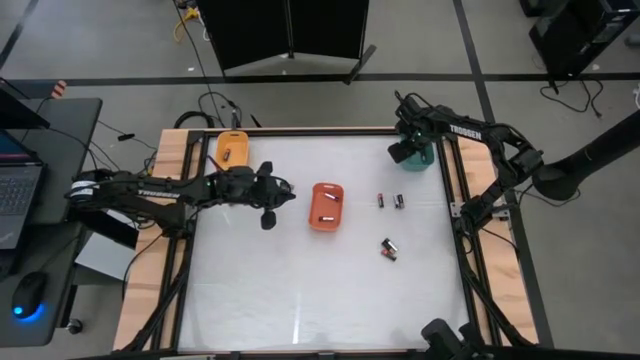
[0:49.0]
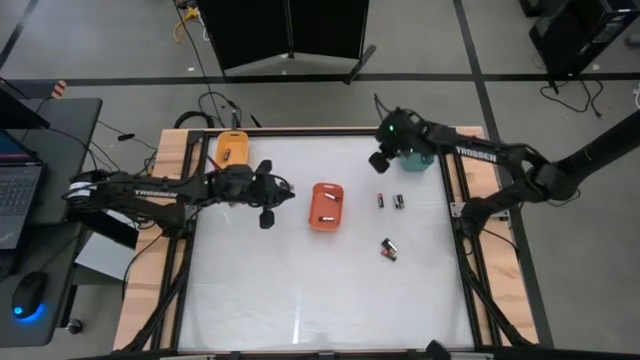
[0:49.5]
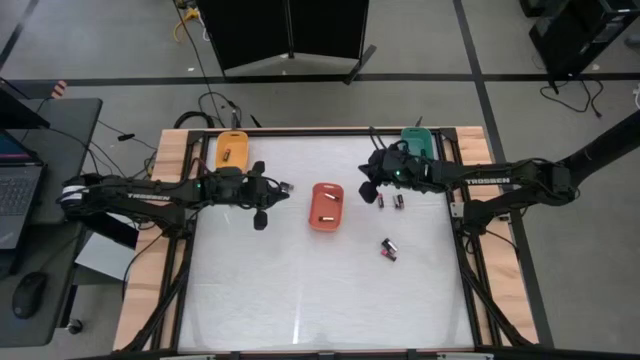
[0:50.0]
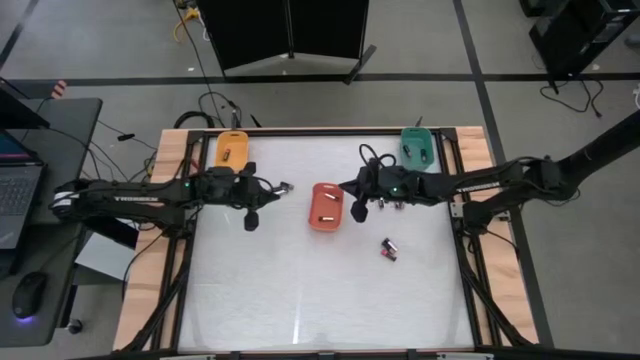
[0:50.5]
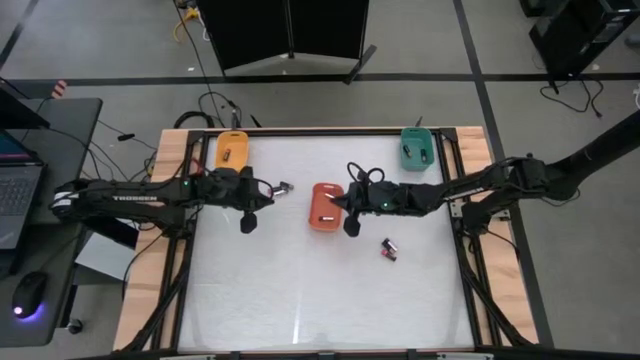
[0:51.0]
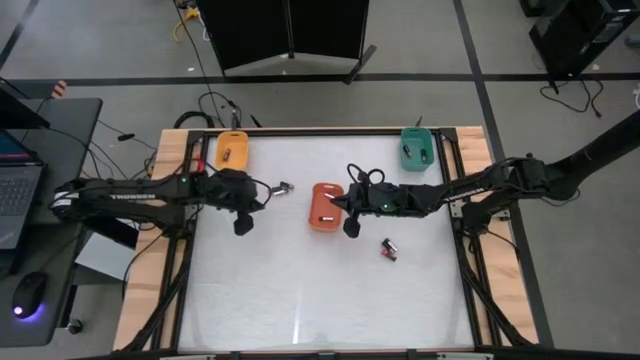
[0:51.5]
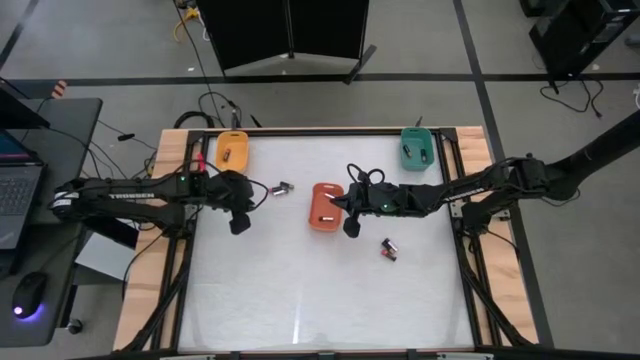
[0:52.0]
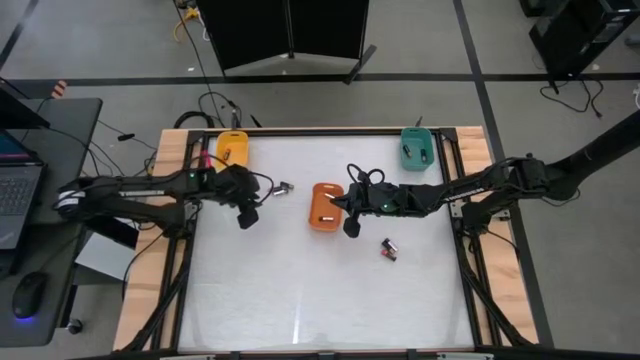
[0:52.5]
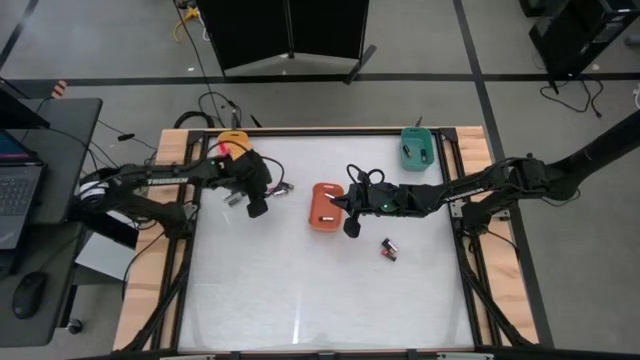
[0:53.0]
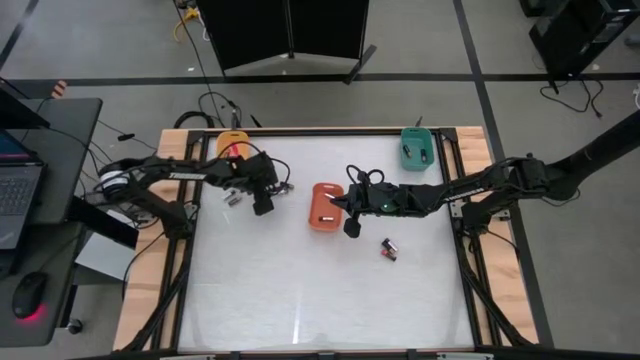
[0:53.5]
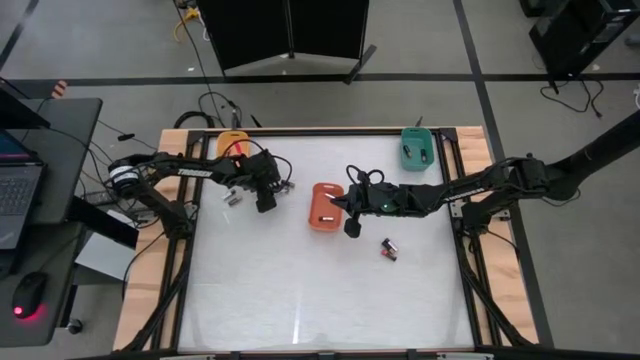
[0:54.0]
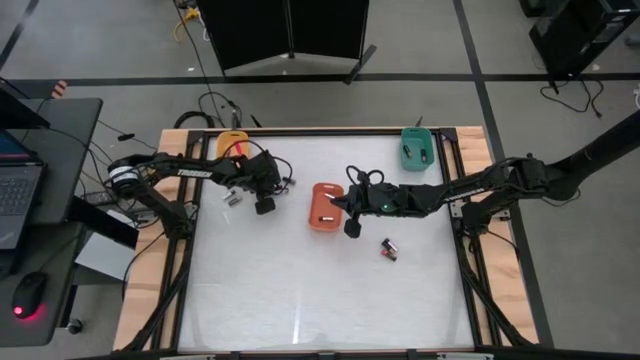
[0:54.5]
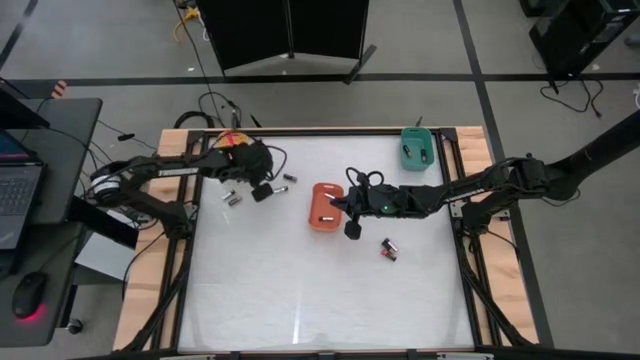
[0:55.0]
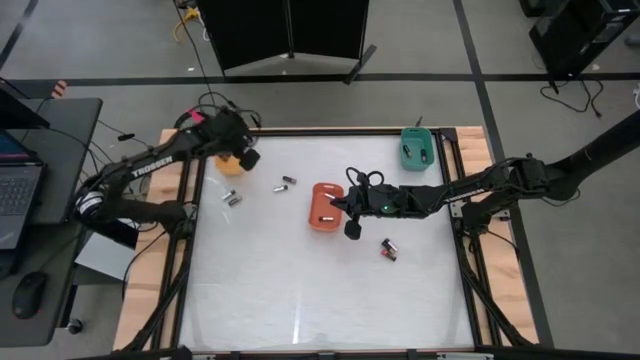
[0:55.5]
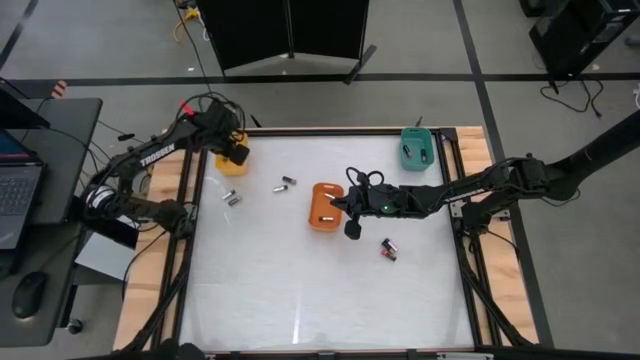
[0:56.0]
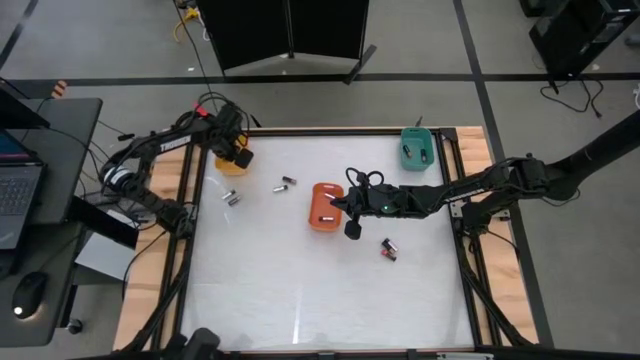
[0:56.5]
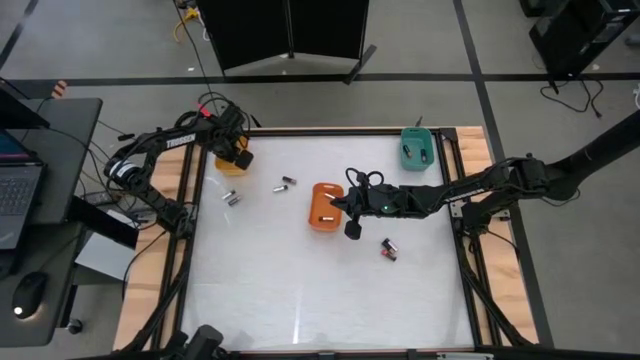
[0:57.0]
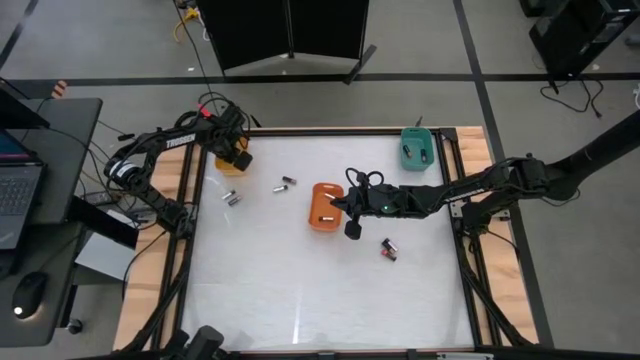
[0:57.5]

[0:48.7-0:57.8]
Task: Sort batteries
Put the black-red battery into the yellow bin

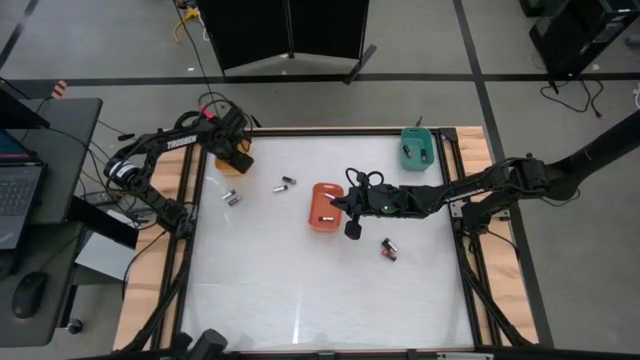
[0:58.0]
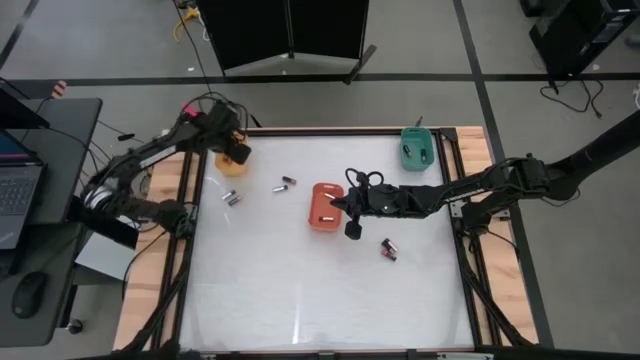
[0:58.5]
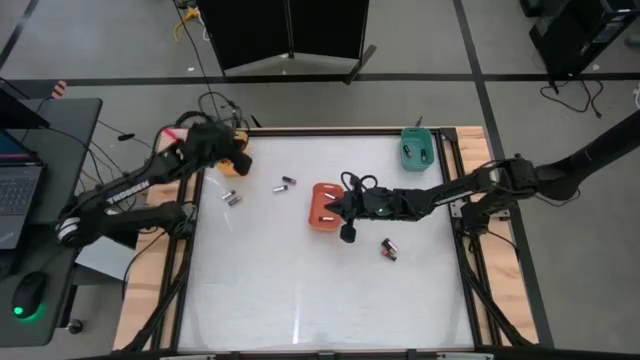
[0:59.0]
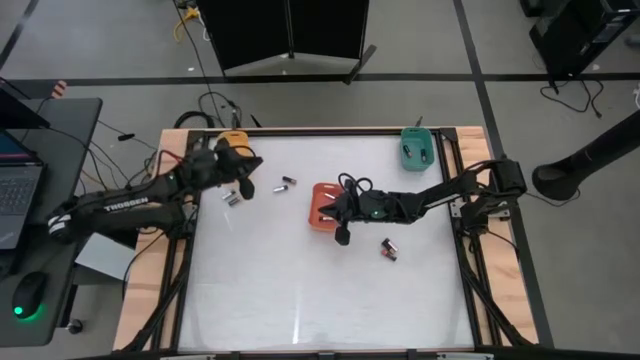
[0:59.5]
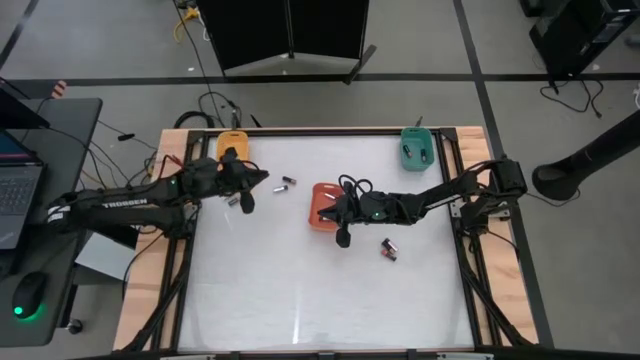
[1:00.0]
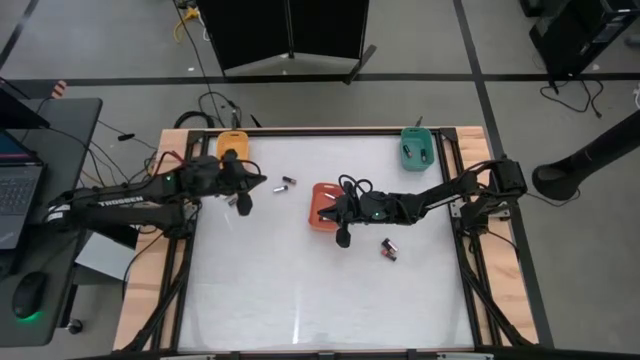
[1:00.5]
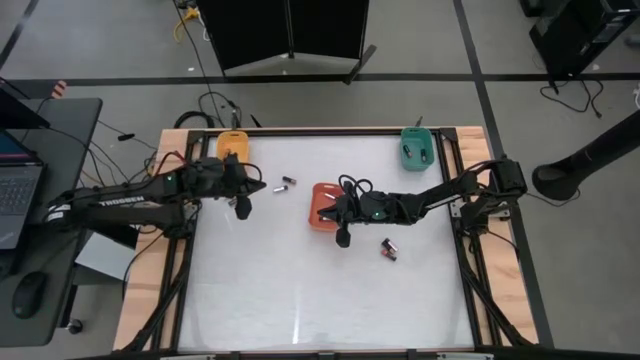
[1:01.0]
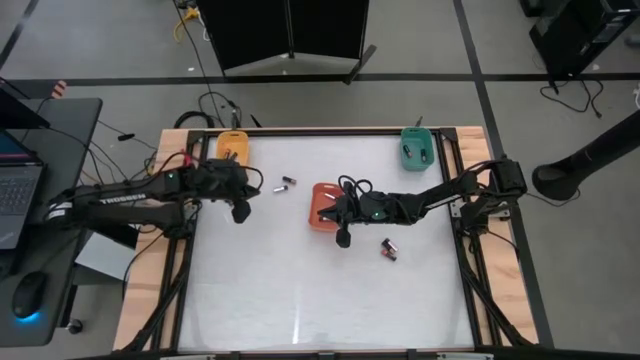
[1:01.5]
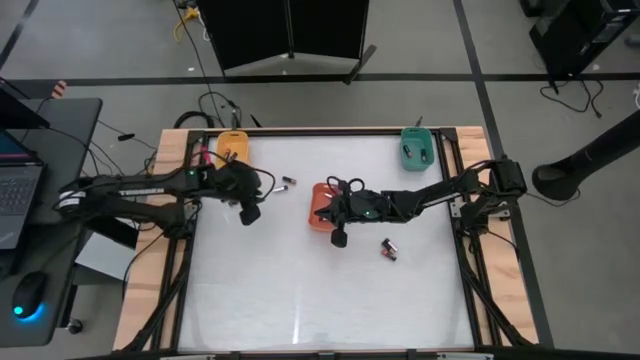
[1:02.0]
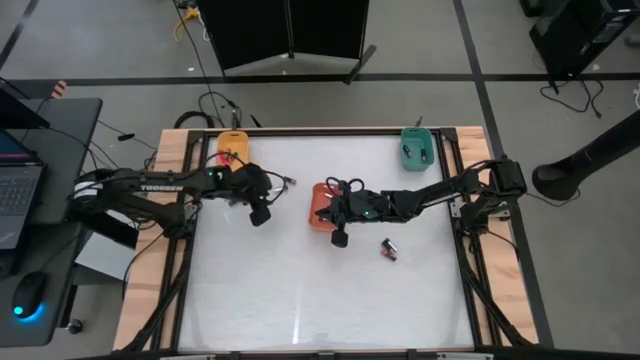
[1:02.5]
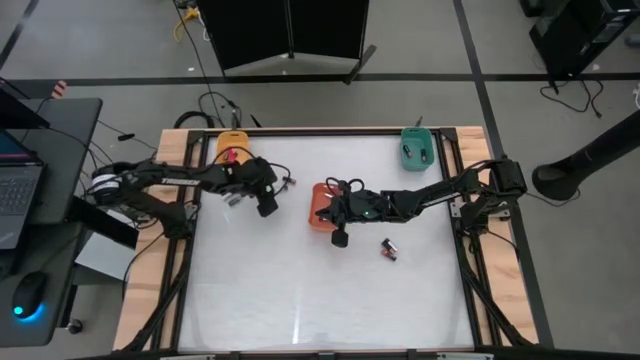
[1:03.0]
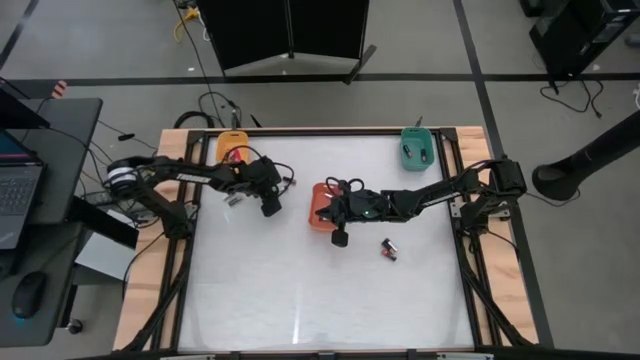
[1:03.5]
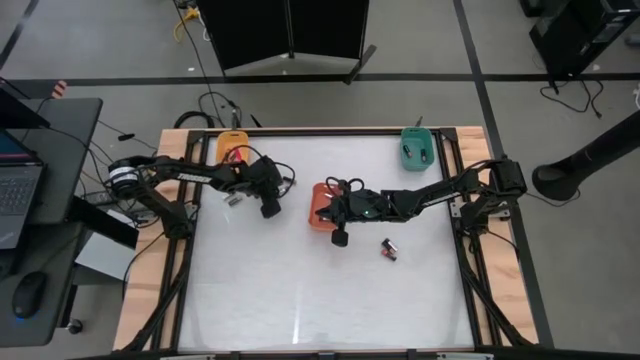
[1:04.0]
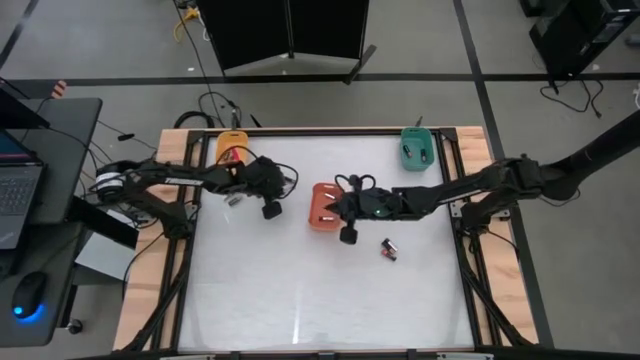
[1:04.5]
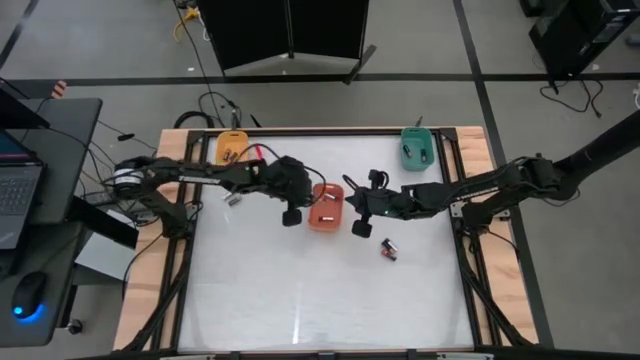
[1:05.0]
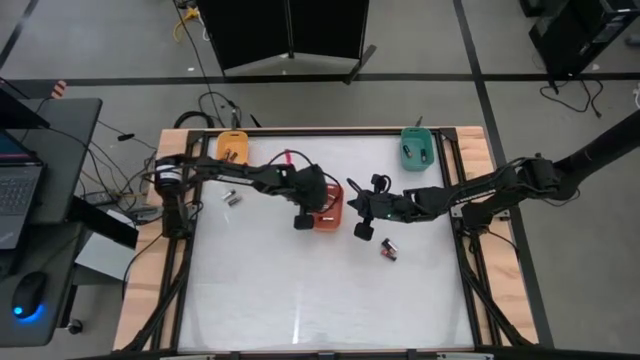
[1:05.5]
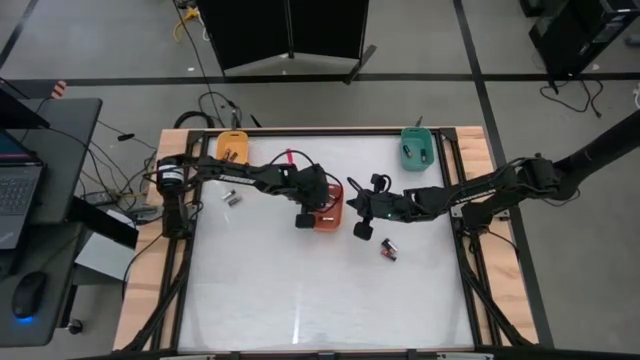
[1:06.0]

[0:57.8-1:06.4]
Put the silver battery into the orange bin

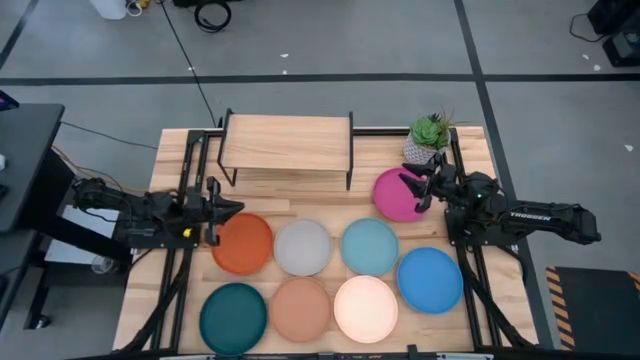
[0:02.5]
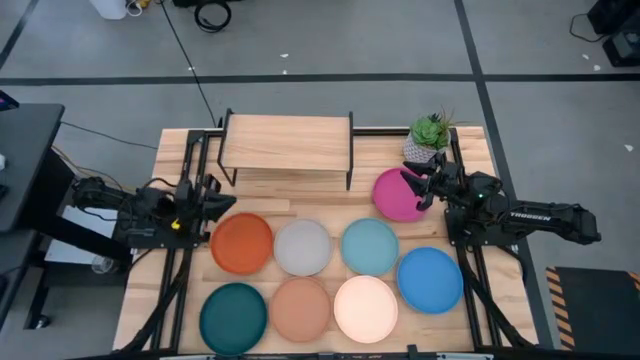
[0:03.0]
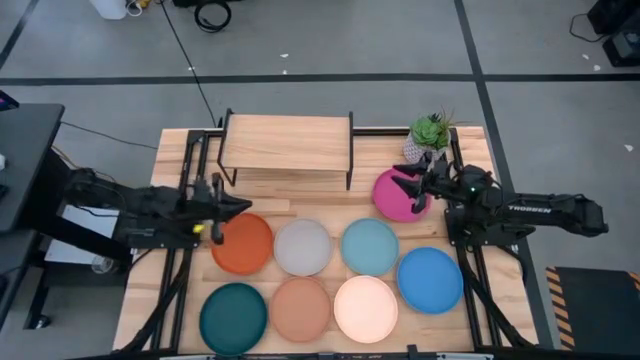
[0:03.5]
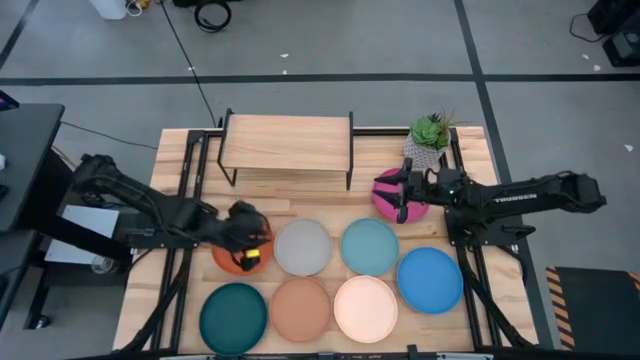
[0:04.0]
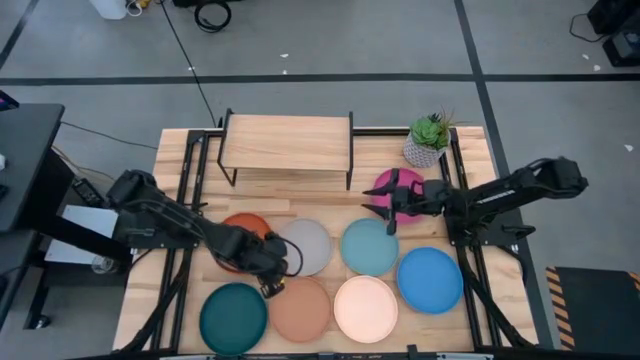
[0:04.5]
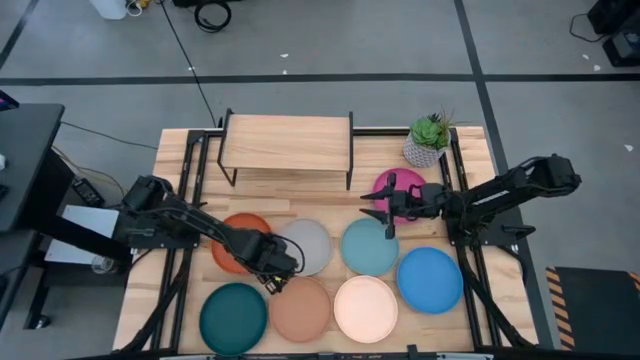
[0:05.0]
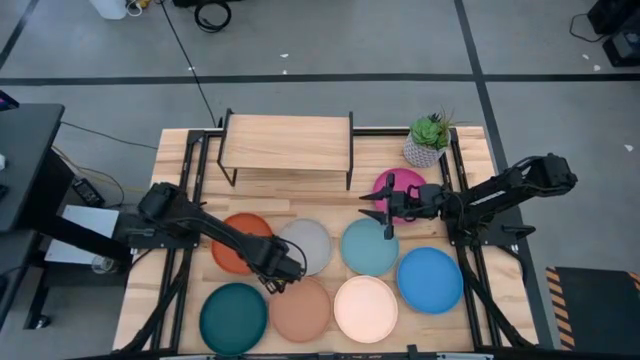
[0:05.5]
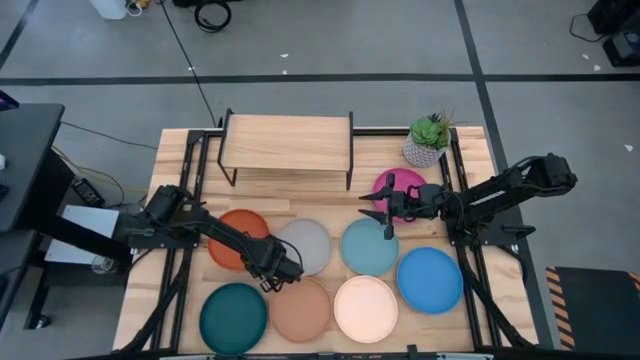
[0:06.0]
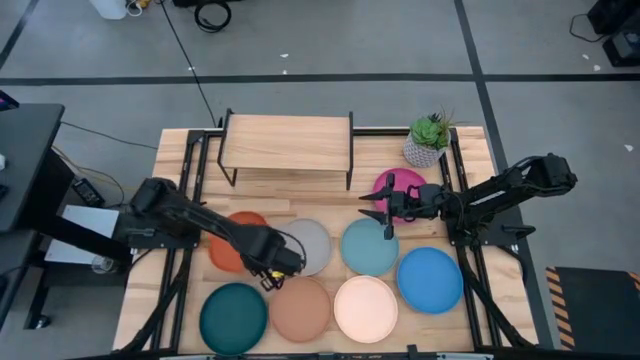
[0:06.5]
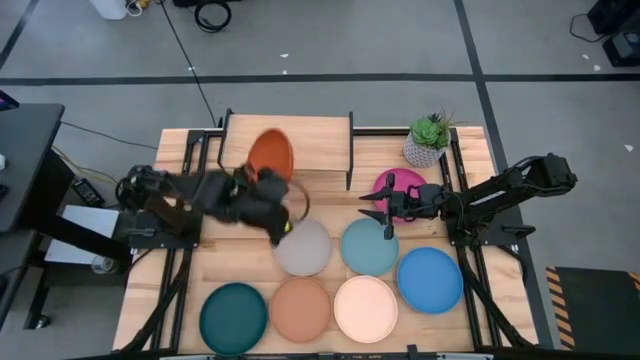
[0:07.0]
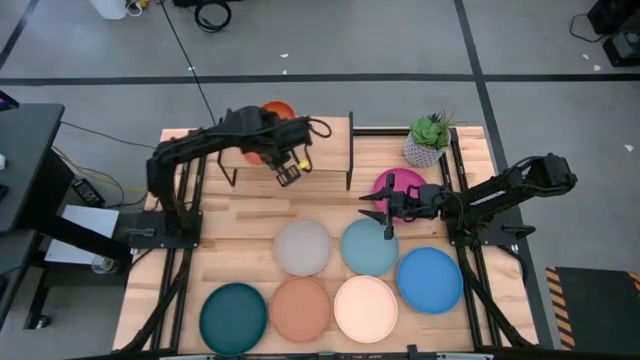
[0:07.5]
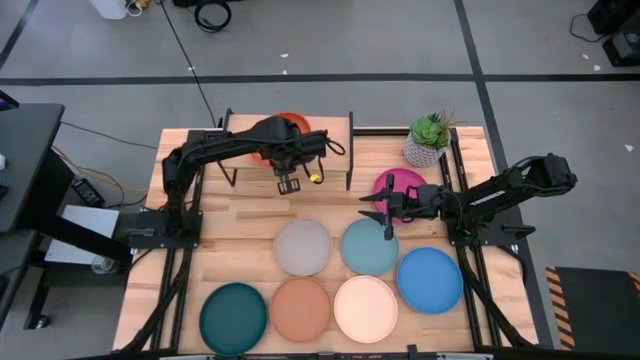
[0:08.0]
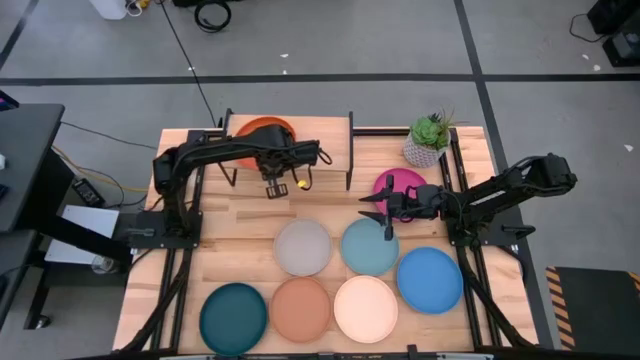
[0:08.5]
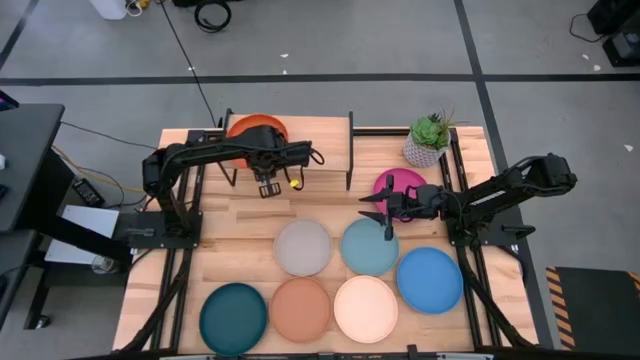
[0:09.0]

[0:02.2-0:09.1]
Task: Place and stack plates onto a shelf
Put the orange plate on the shelf
